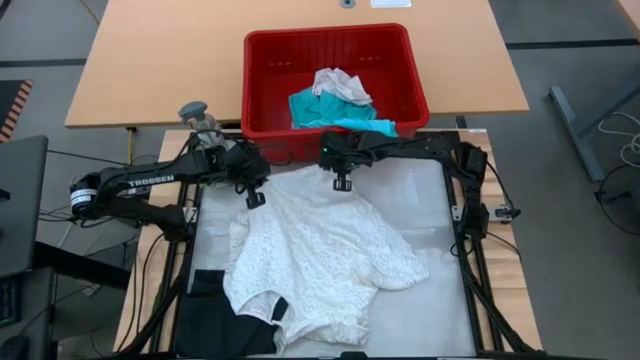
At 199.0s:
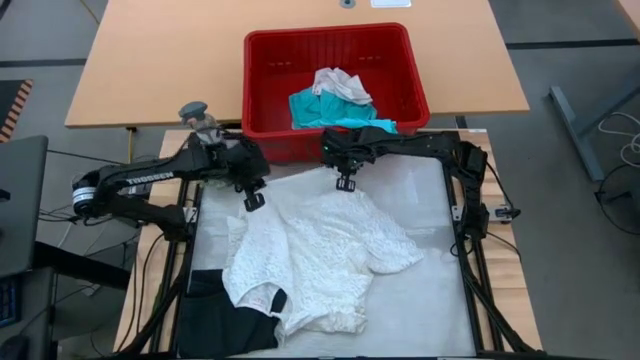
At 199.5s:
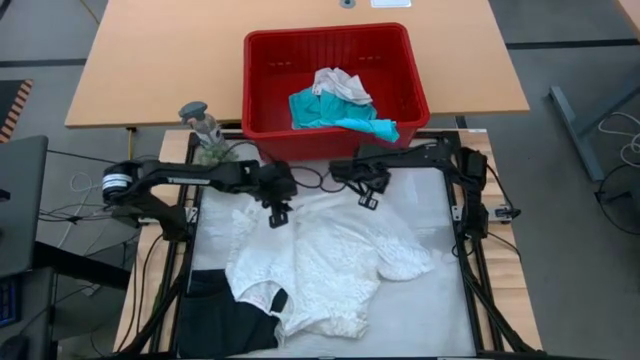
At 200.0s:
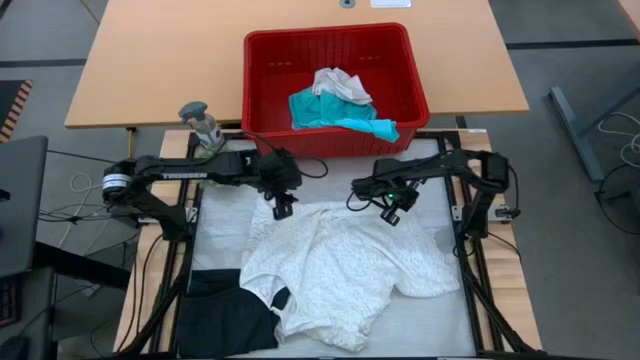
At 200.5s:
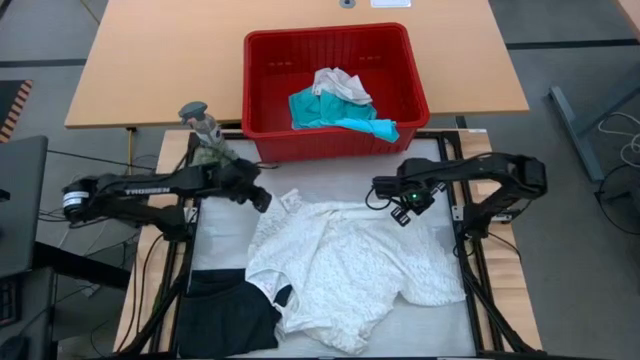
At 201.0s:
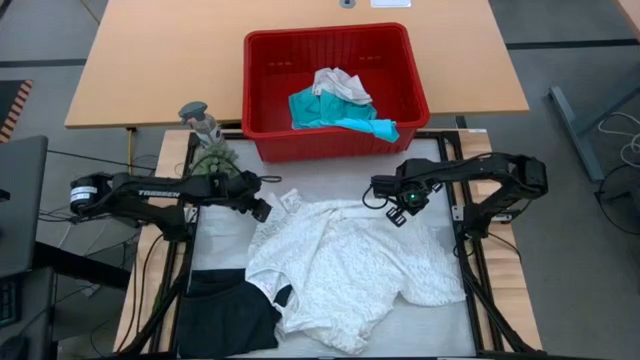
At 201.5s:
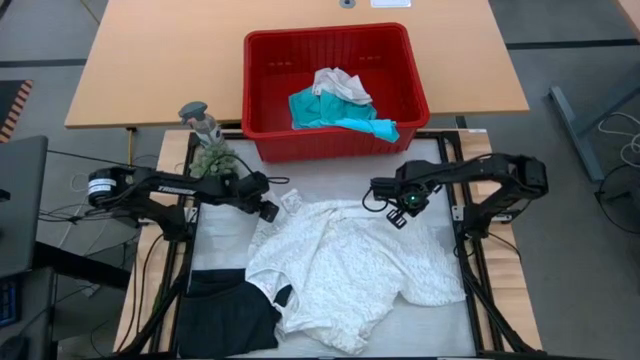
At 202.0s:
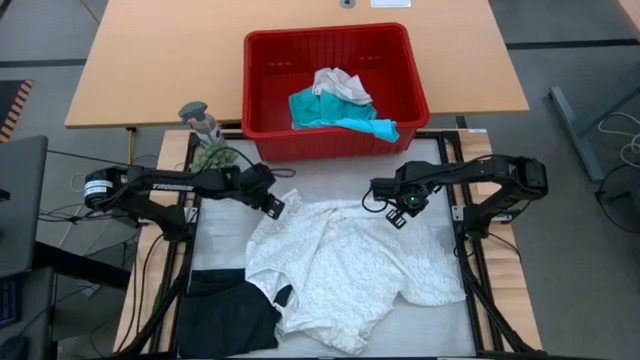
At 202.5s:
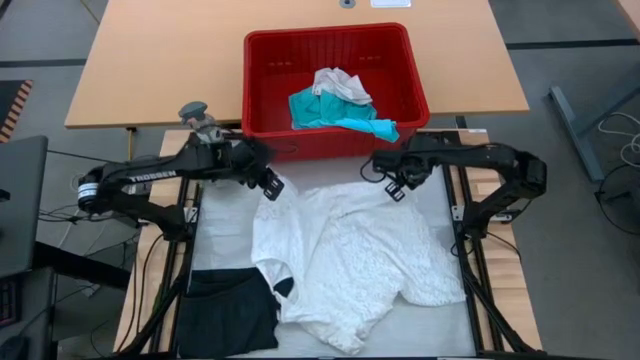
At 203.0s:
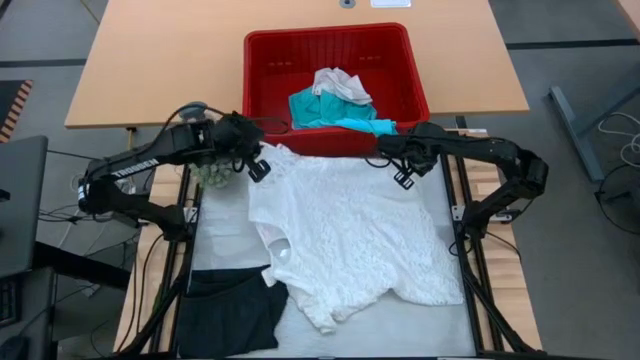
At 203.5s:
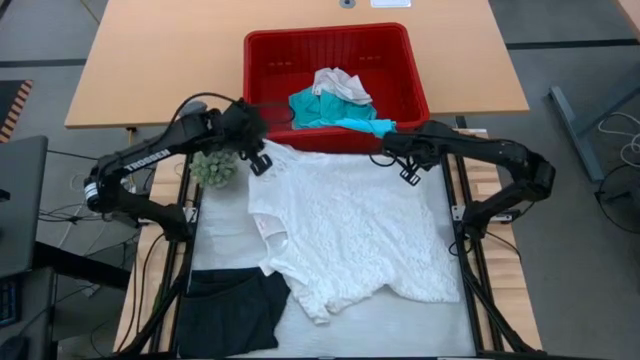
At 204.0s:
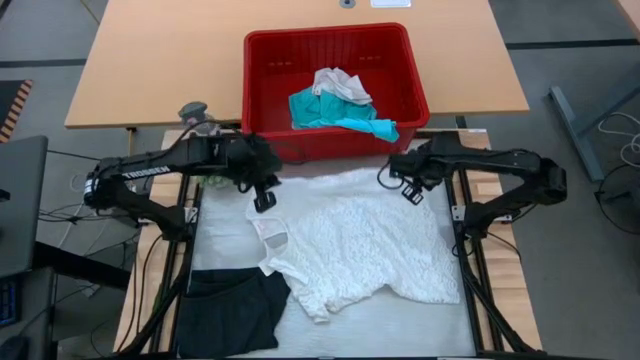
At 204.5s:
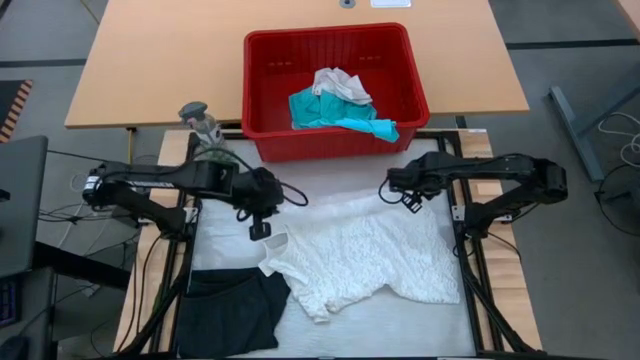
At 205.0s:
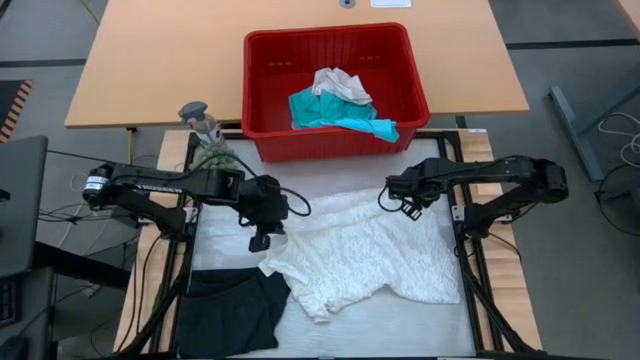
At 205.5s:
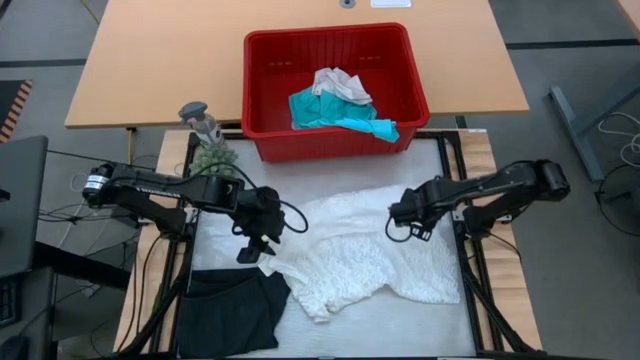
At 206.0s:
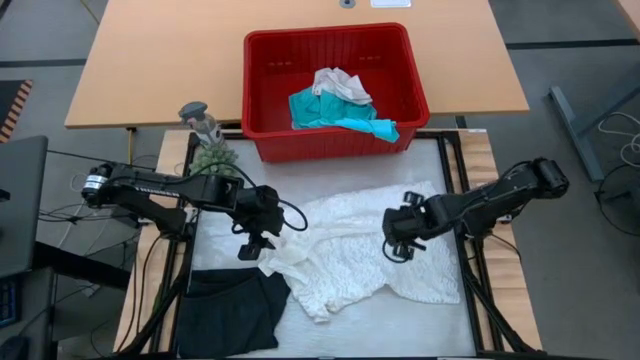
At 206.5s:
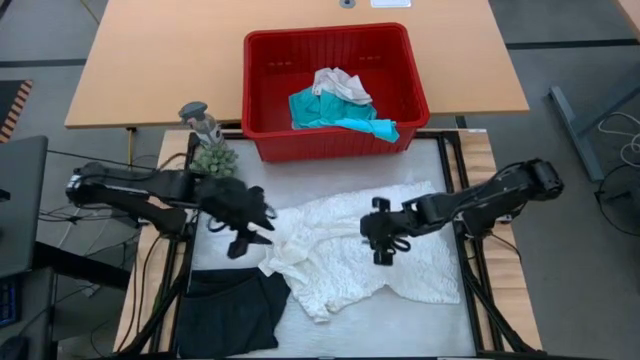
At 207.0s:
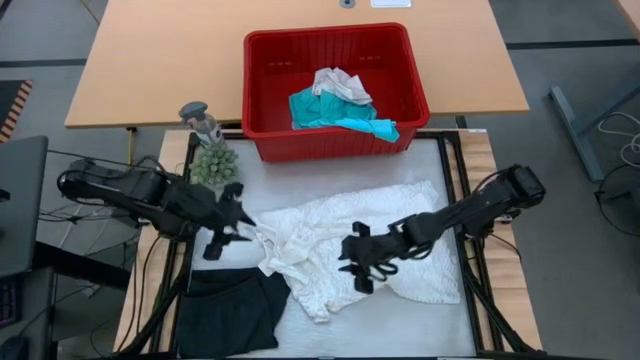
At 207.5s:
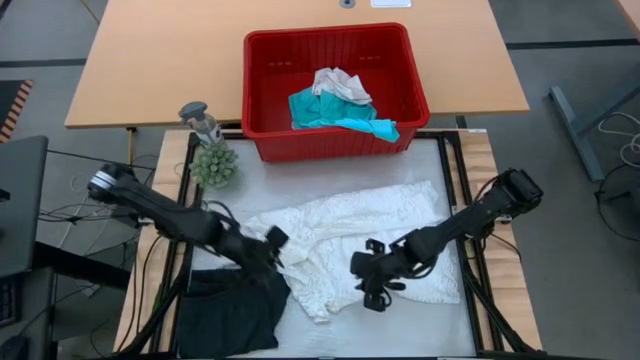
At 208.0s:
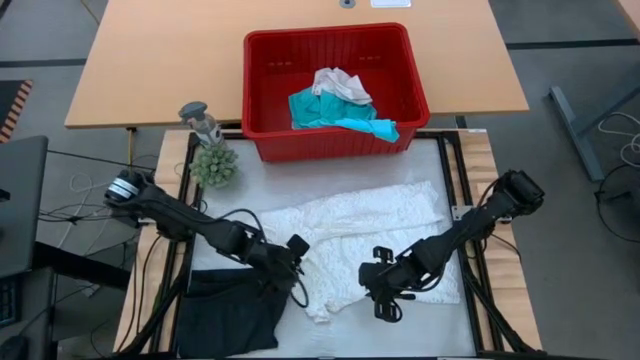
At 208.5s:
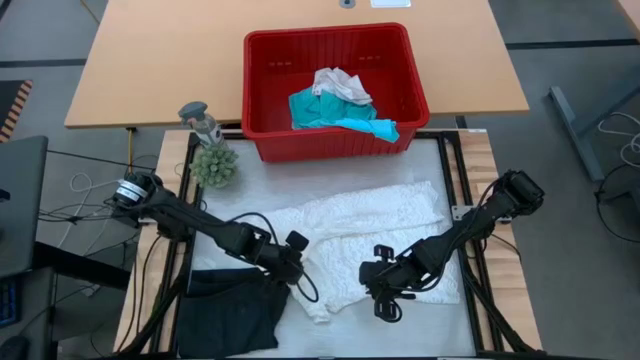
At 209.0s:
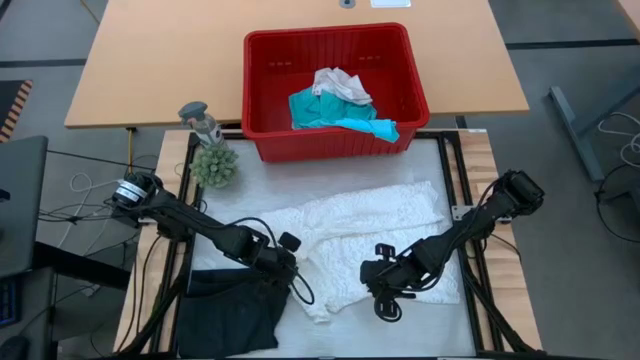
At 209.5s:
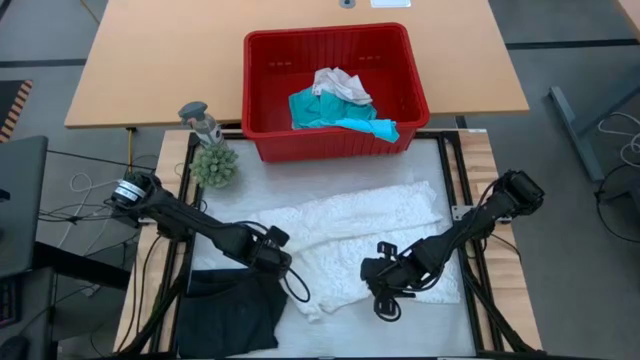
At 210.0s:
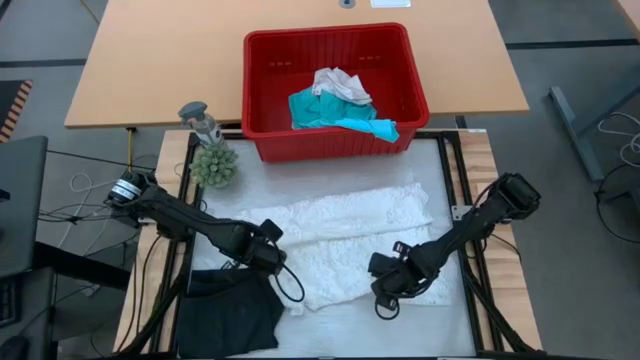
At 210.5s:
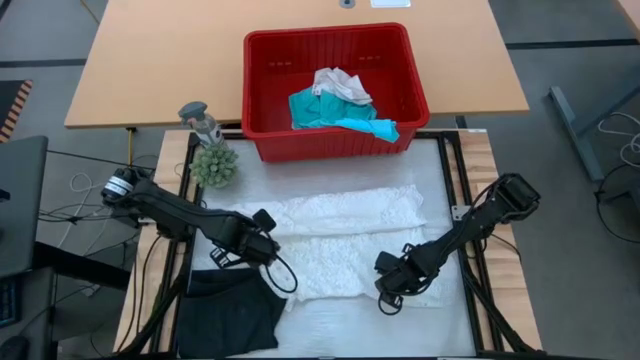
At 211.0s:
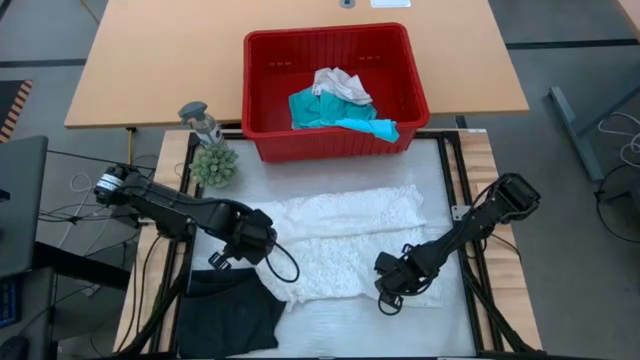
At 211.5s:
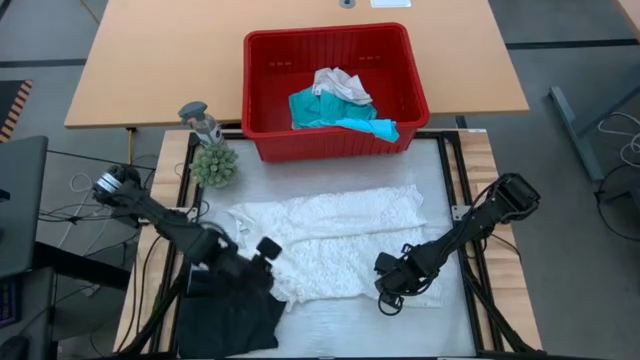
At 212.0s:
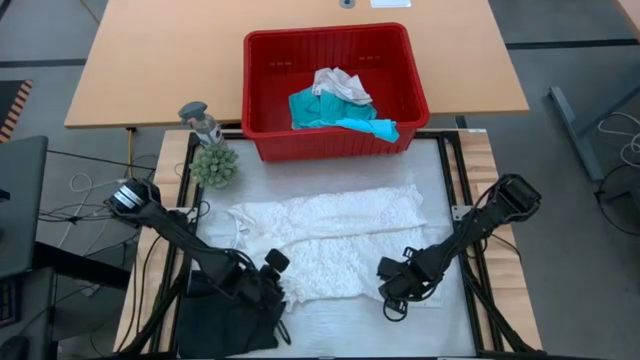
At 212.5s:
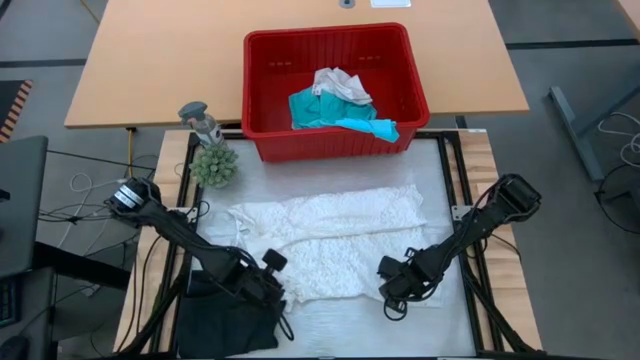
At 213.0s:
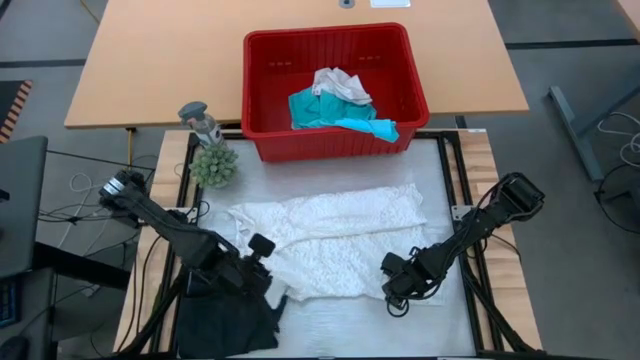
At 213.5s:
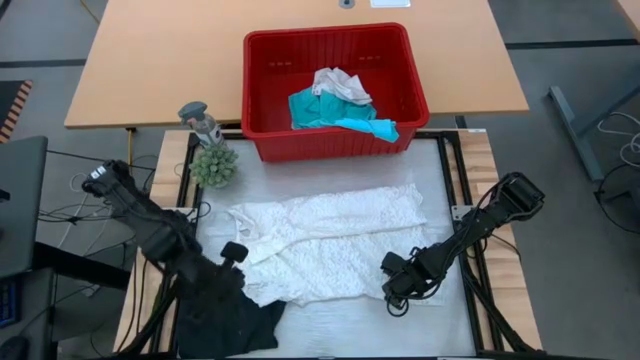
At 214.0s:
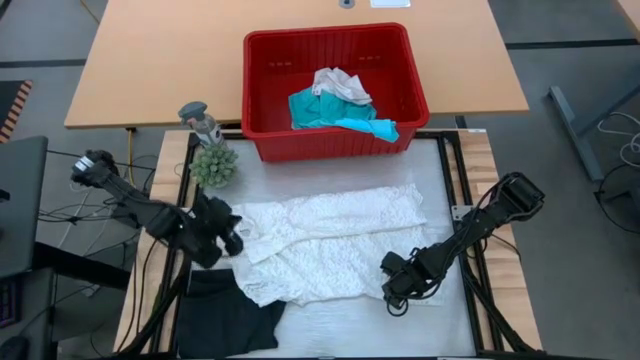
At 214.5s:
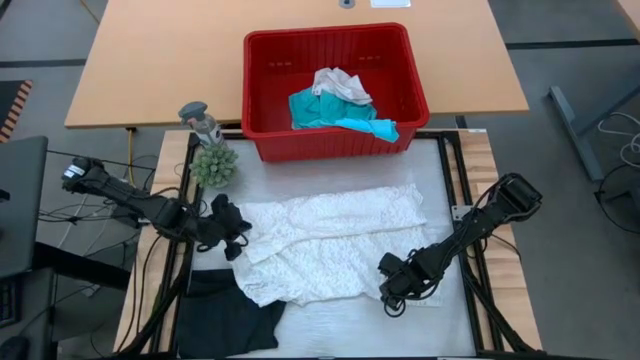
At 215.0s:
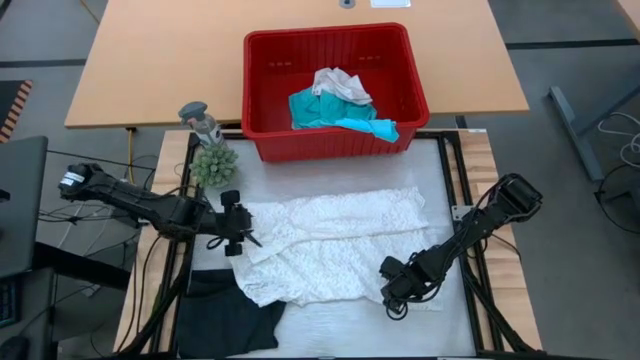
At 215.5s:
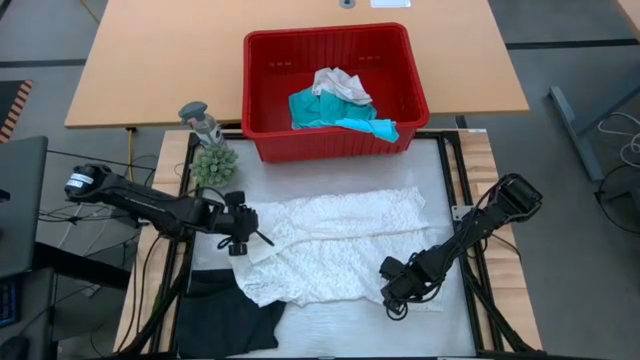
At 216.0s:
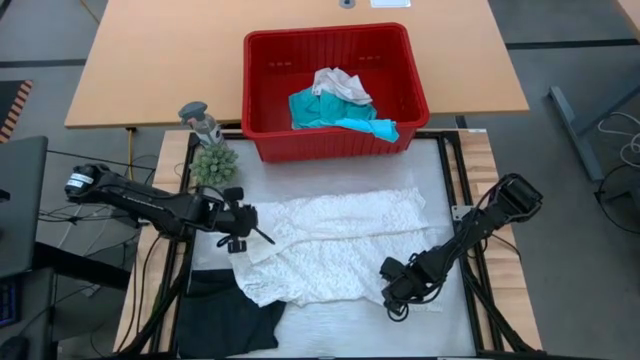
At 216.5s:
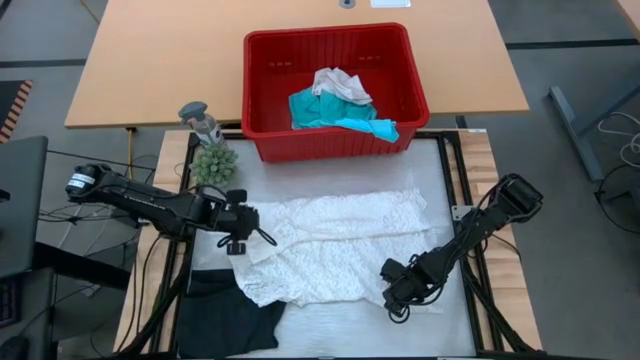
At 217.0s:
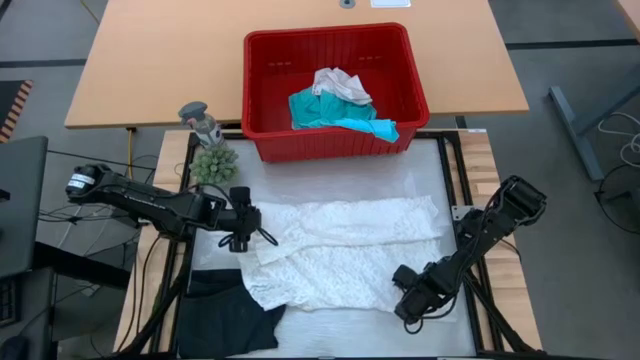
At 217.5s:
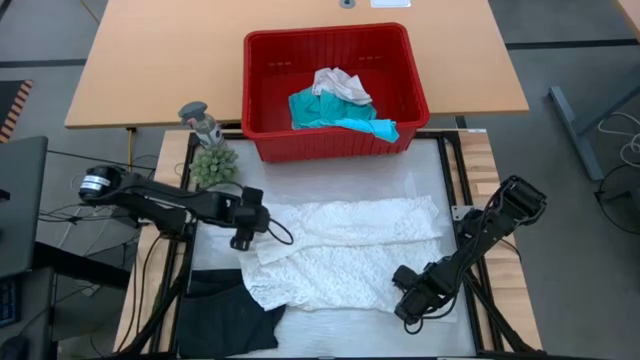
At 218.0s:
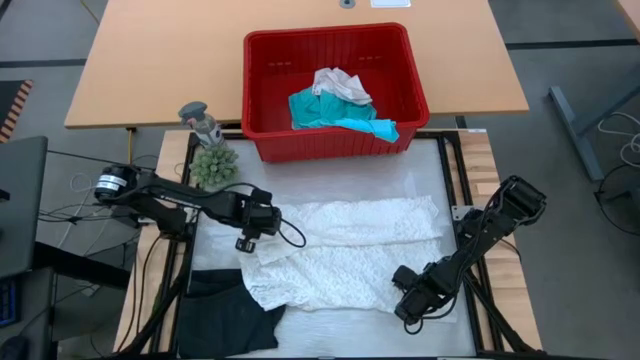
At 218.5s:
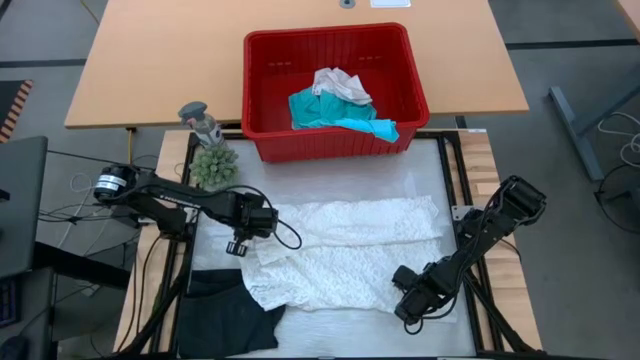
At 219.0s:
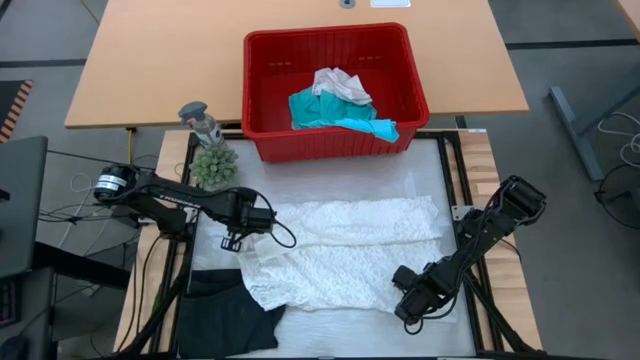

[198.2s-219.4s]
Task: Fold Laundry from Bin
Fold the white dress
